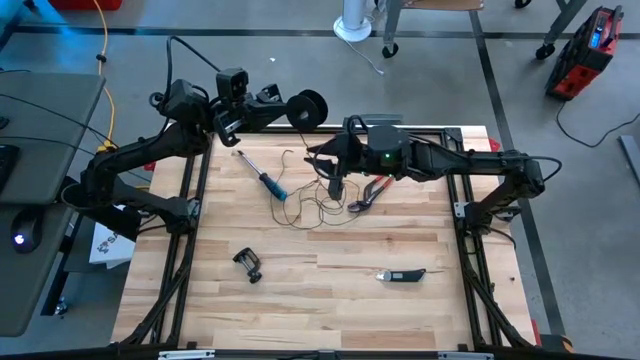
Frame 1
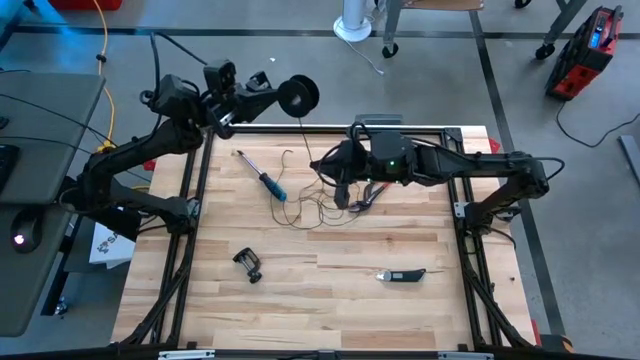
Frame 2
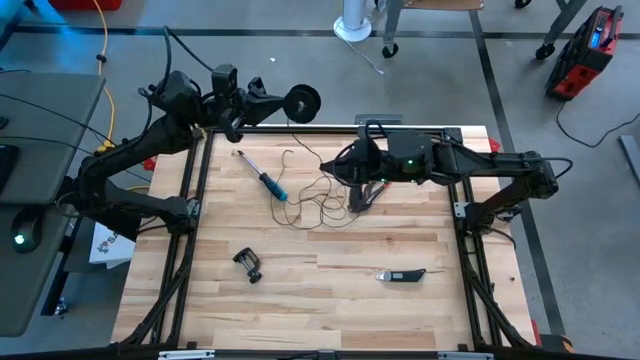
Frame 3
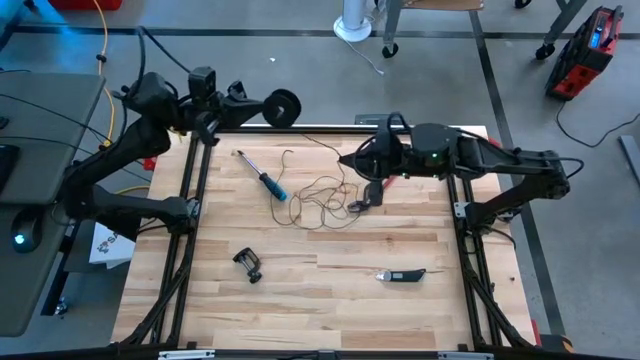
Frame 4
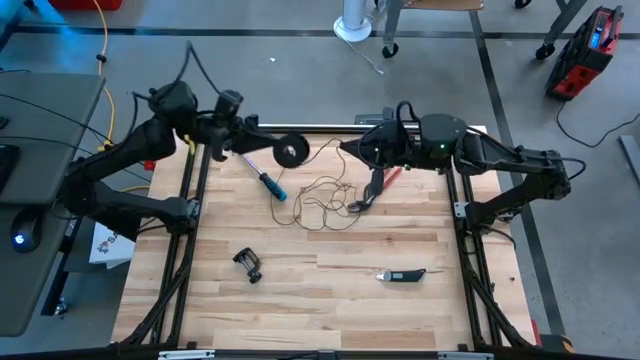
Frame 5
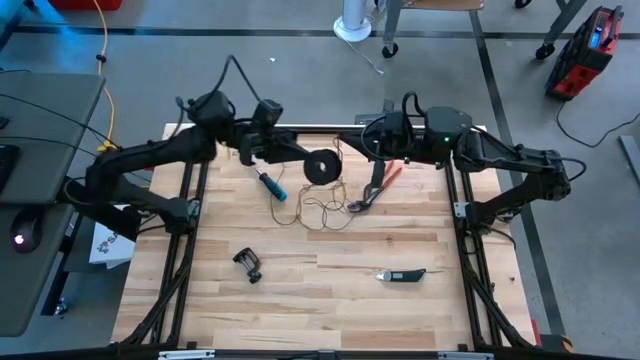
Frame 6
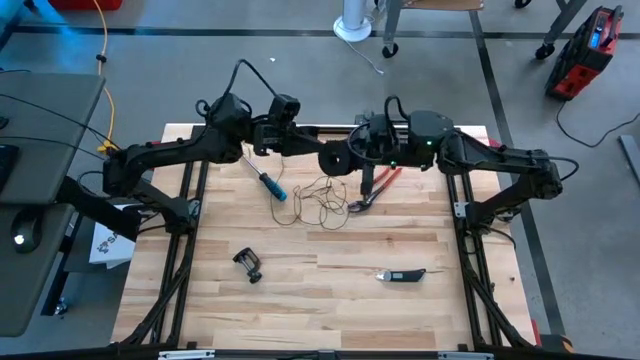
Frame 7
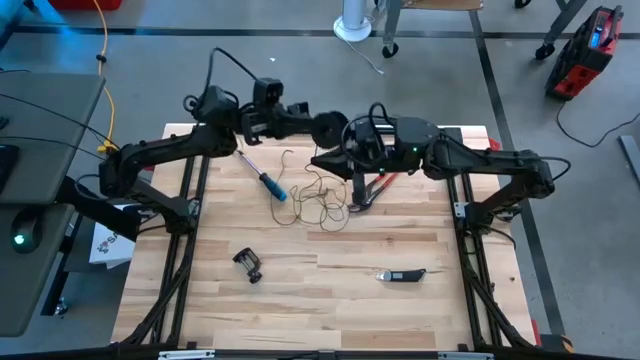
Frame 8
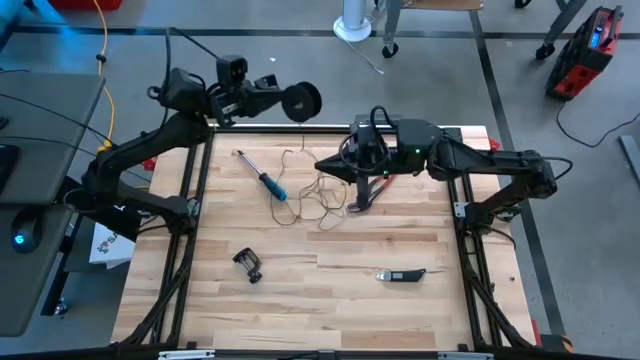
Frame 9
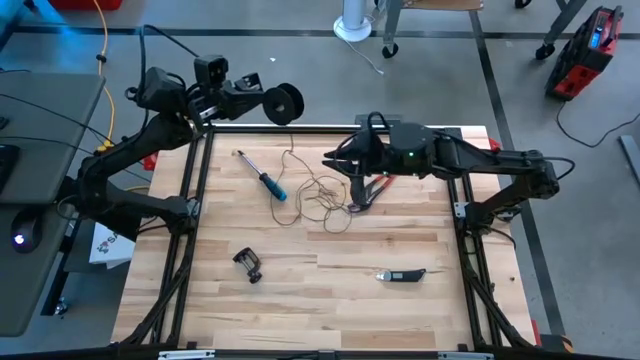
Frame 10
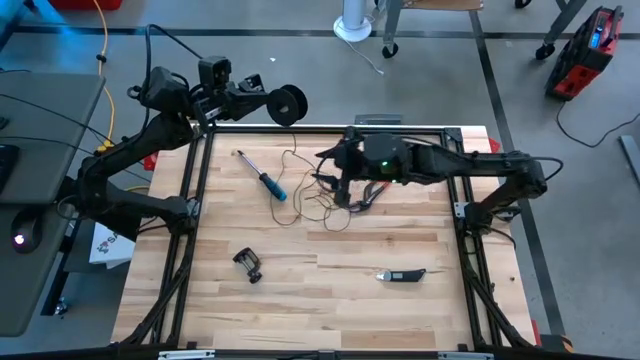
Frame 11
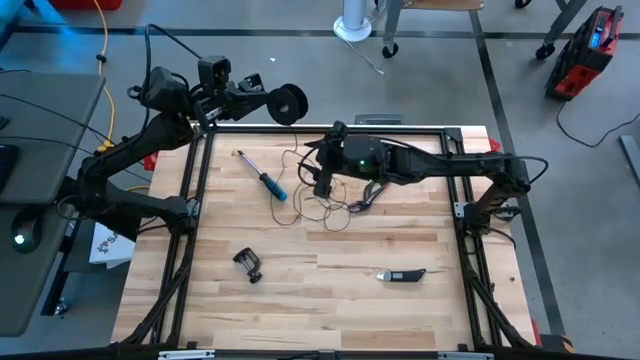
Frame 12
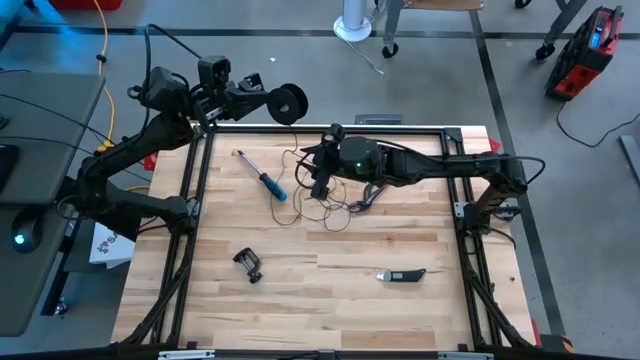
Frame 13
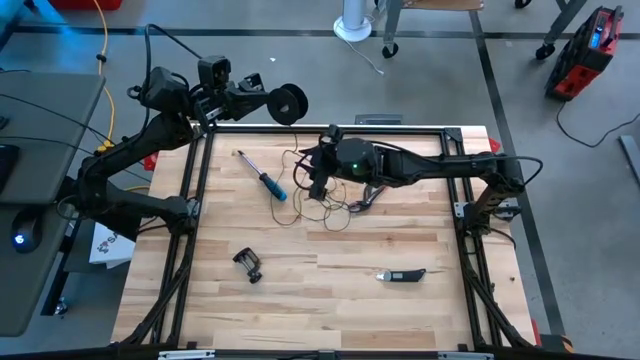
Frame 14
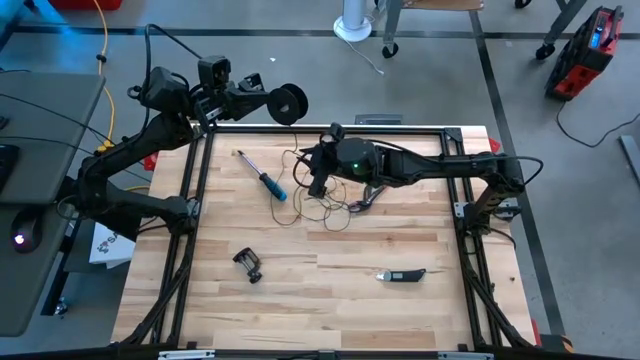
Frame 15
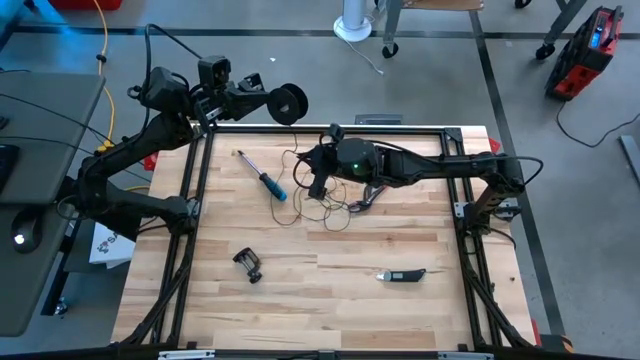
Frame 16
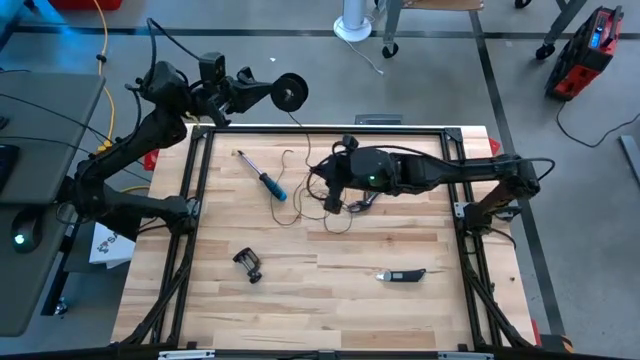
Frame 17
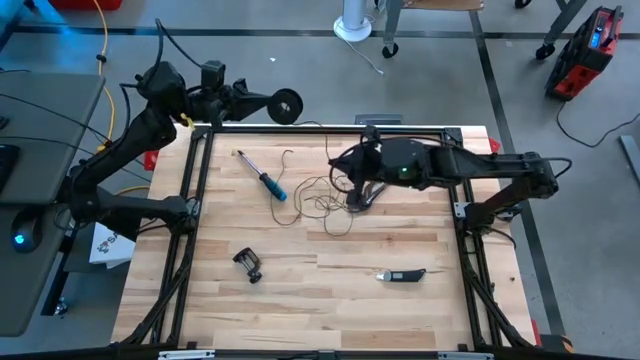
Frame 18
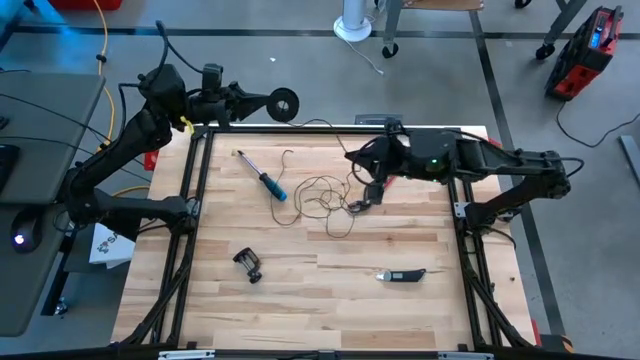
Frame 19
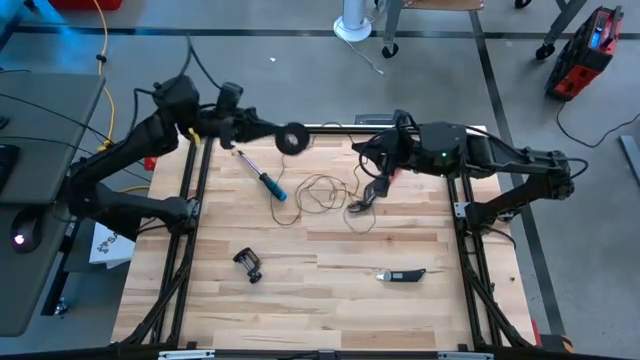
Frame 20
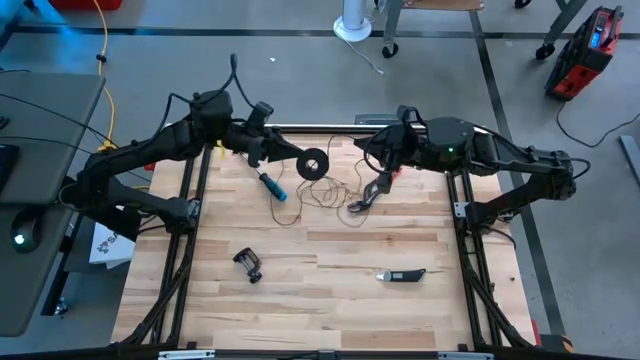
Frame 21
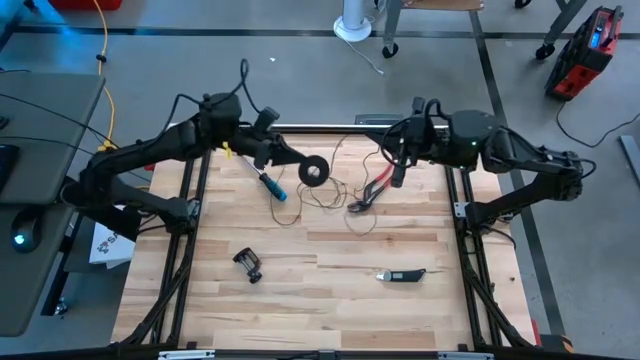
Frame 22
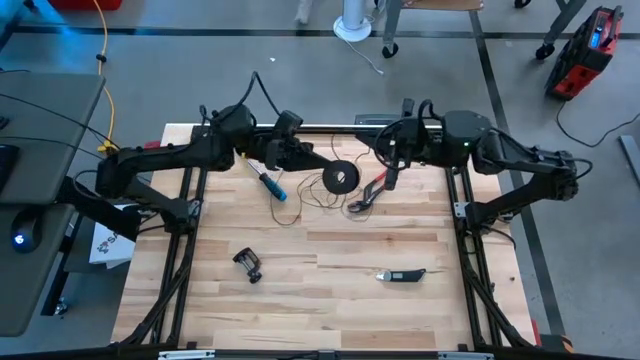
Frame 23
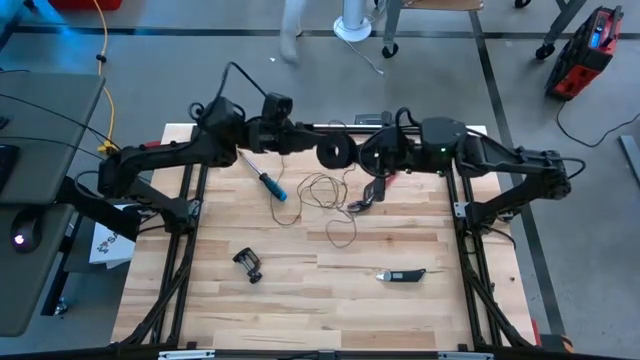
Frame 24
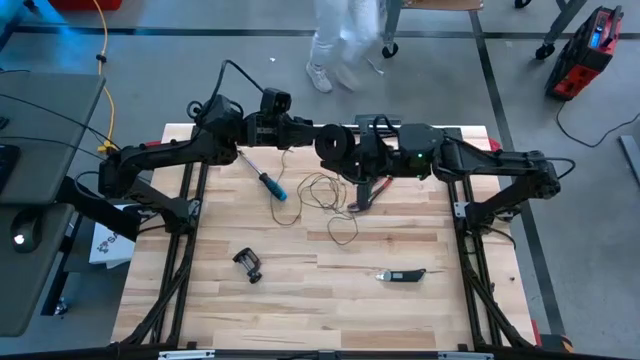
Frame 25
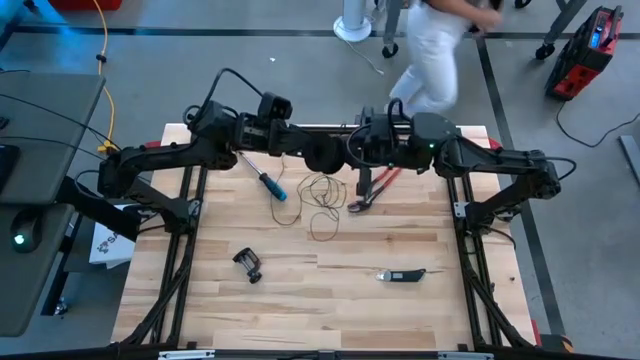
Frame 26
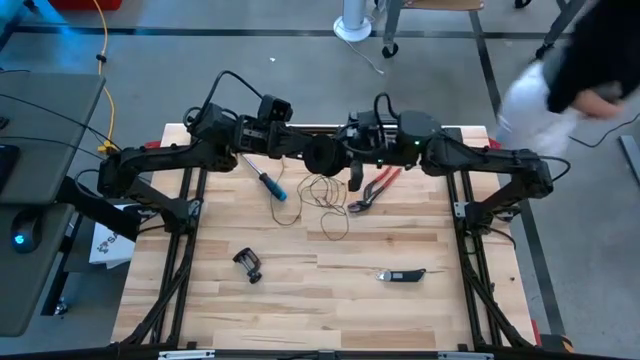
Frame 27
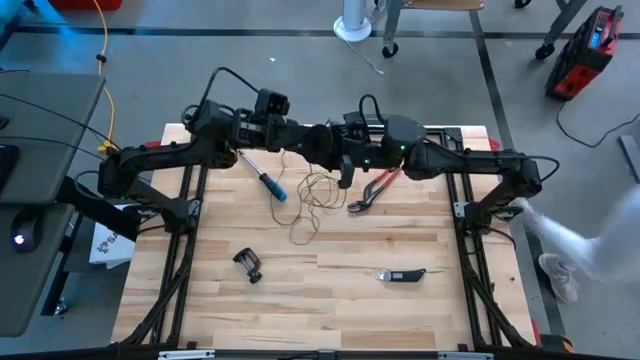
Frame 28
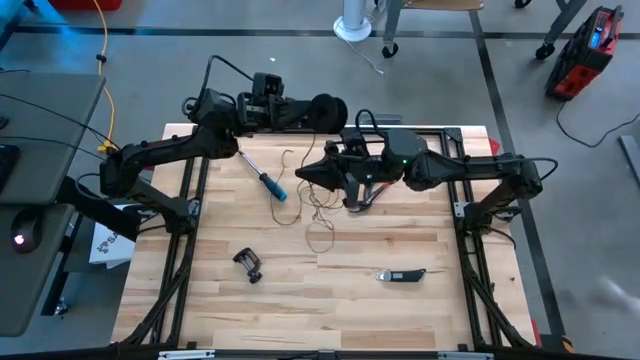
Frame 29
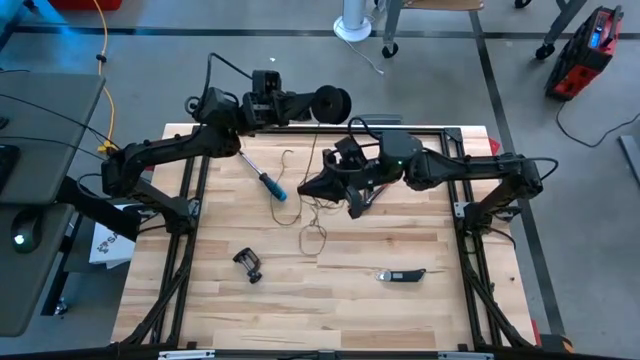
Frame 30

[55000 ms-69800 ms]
Task: Coil cords
Coil the black wire onto the black spool
